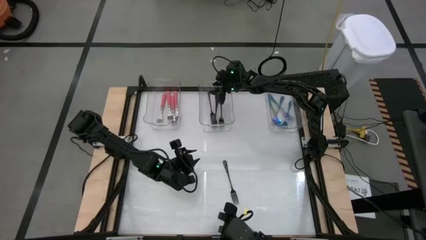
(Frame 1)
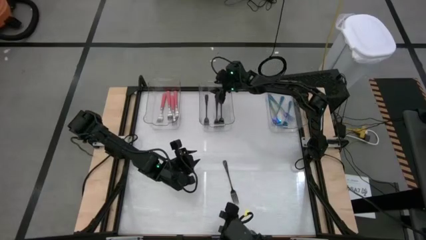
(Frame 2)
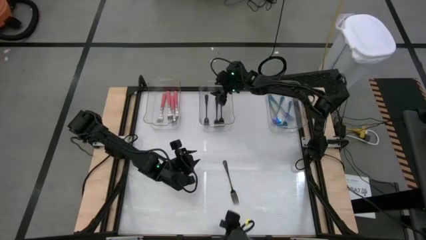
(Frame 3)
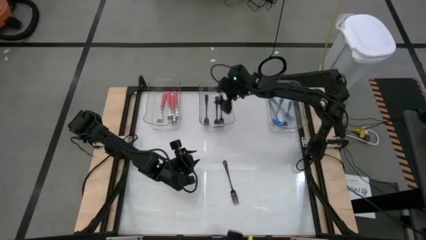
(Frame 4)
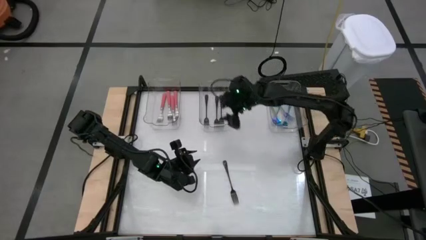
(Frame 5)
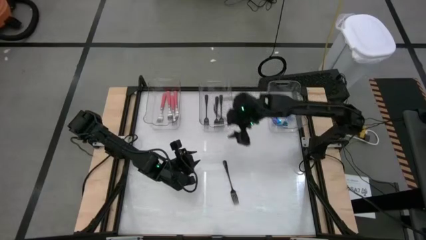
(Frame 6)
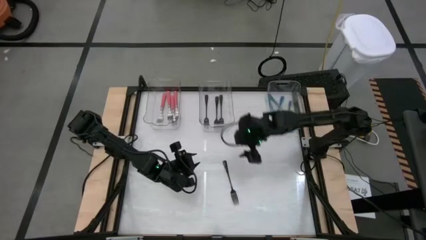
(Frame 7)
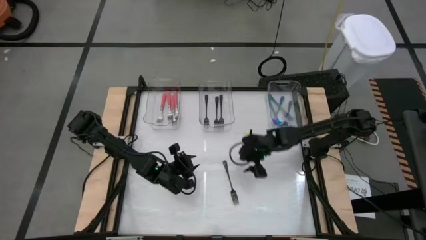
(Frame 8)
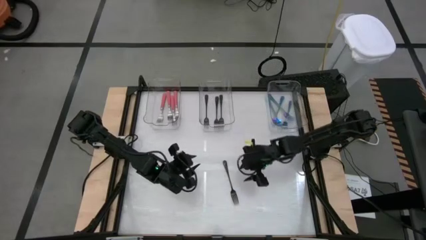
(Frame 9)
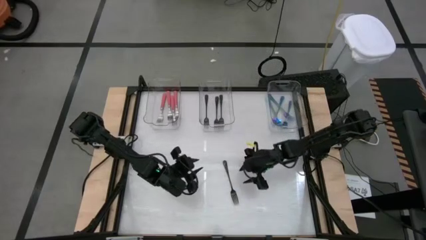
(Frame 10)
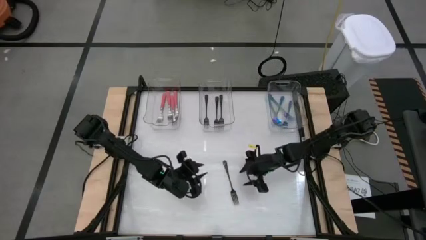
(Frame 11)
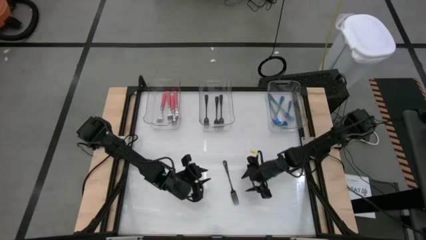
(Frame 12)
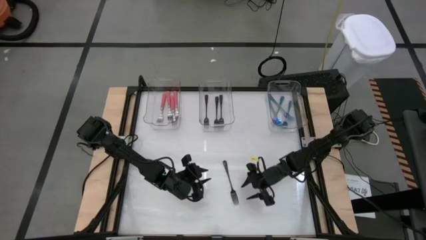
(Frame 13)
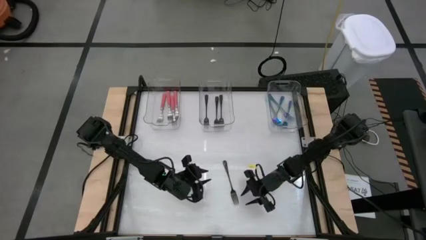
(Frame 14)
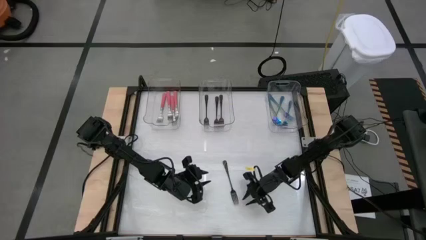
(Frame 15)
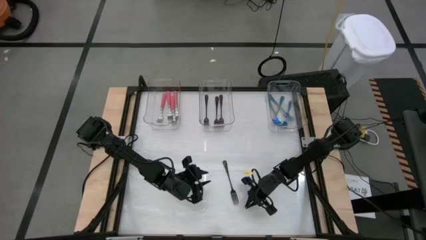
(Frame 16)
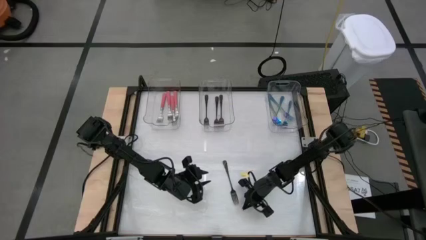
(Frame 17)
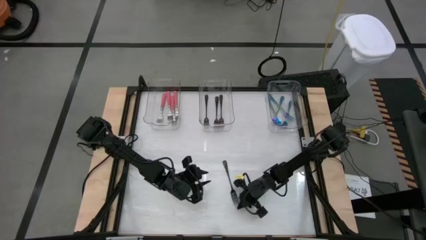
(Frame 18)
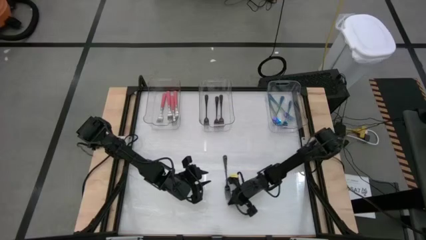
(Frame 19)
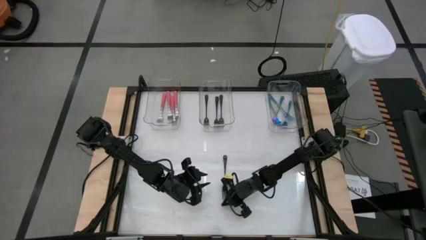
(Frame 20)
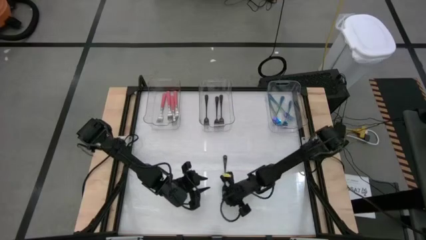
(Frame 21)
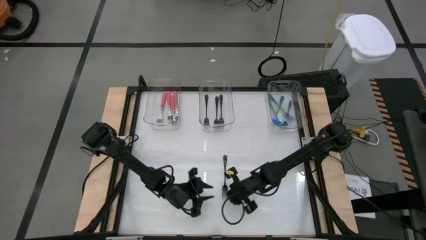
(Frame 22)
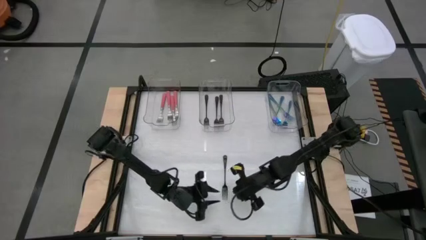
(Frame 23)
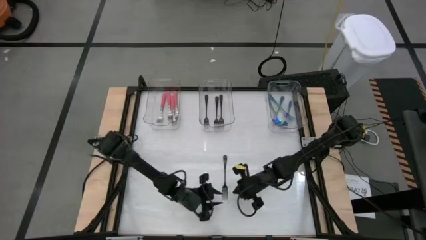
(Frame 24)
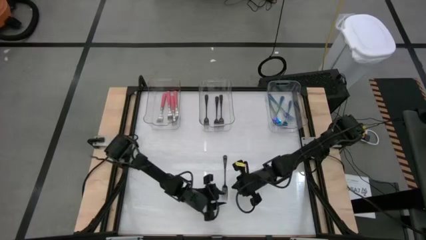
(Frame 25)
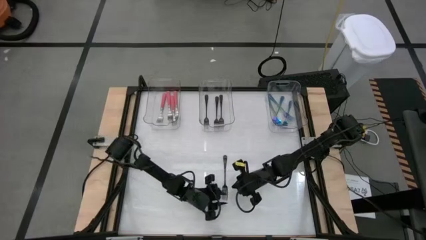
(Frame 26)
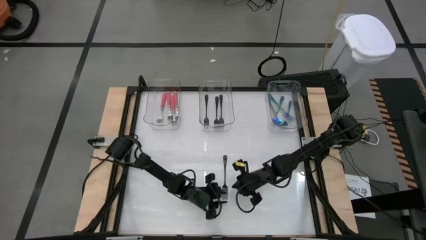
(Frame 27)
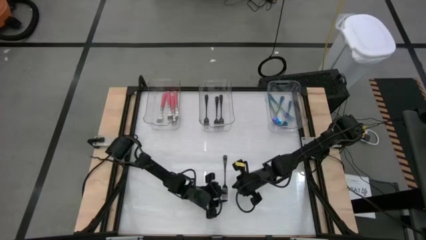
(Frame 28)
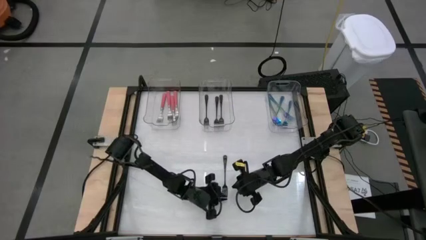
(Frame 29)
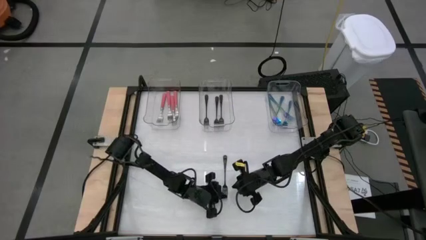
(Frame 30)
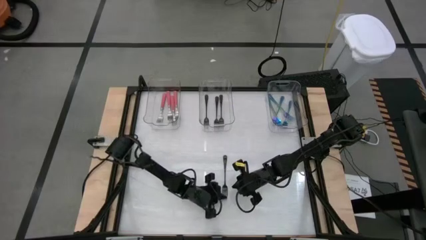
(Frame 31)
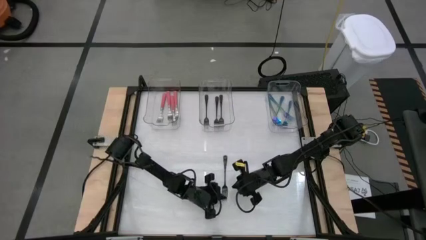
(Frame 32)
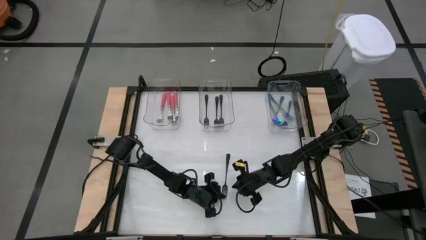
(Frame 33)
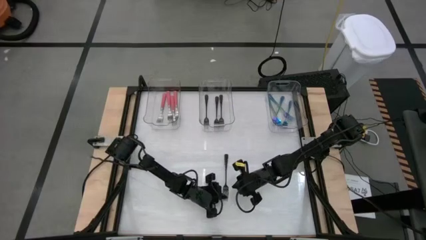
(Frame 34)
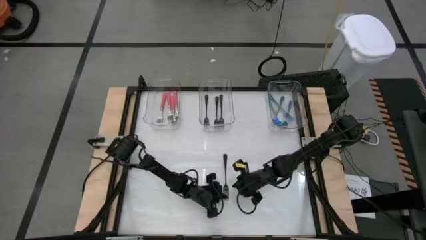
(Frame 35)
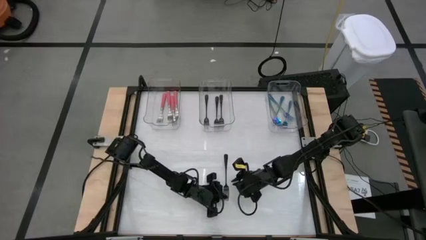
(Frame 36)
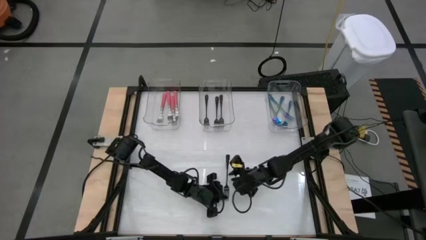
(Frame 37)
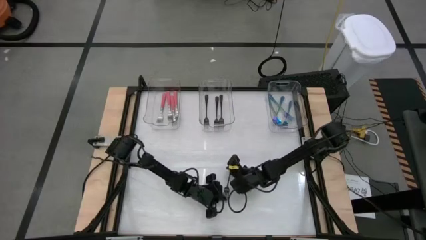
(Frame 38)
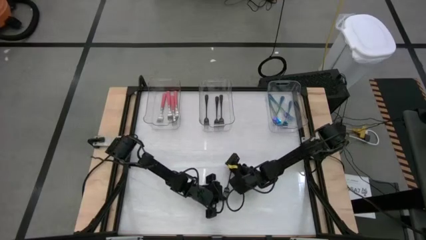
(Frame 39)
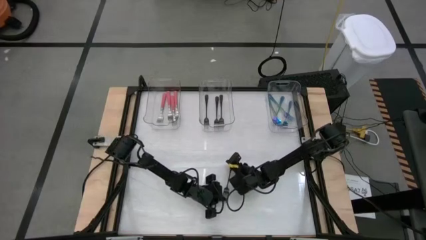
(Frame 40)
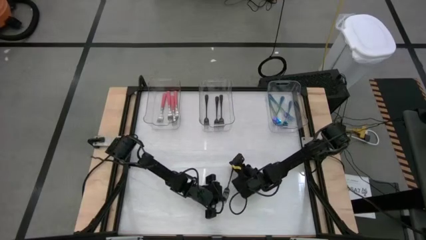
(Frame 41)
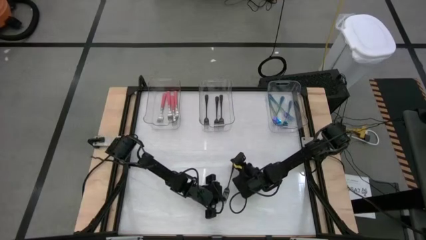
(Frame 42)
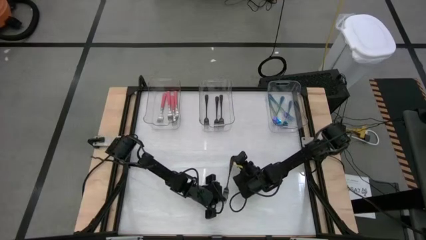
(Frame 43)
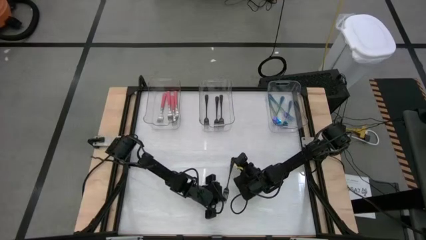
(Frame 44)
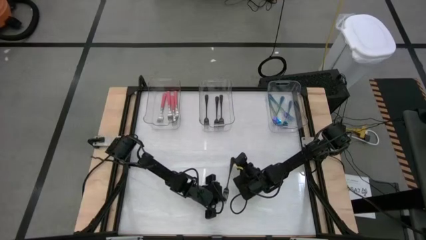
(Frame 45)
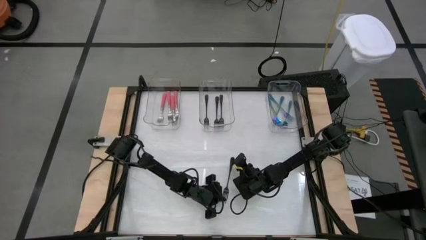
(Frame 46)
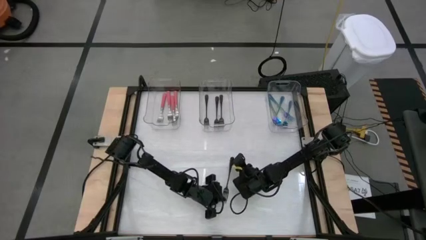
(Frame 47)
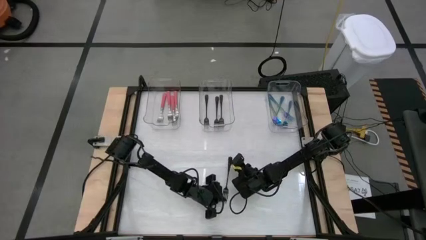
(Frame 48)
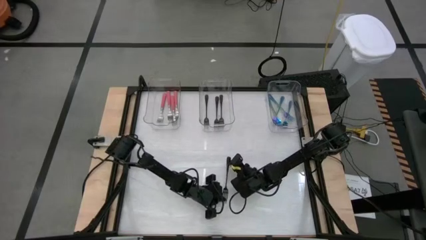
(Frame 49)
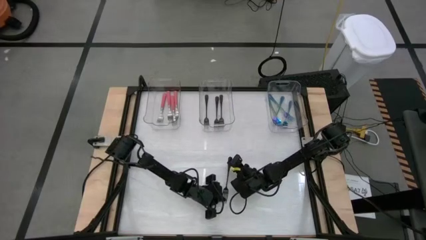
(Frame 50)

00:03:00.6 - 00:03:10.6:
Task: Sort silverware by color (type)
Put the black fork into the middle transparent bin
